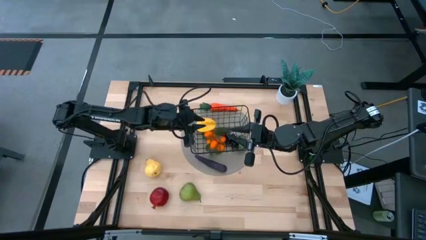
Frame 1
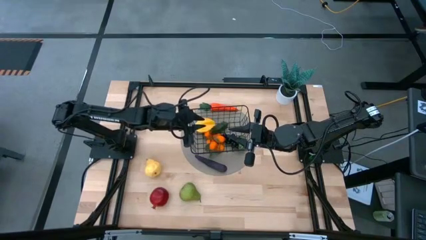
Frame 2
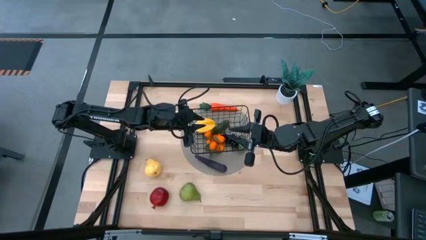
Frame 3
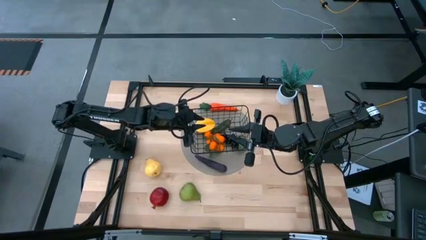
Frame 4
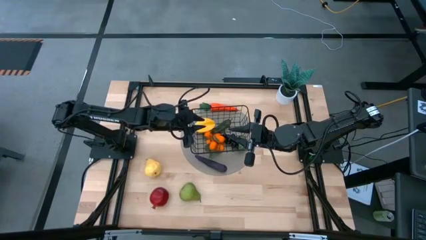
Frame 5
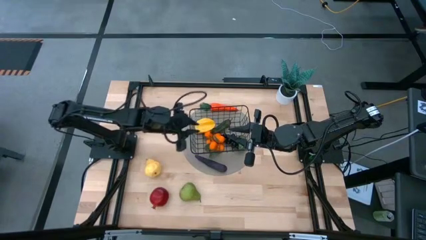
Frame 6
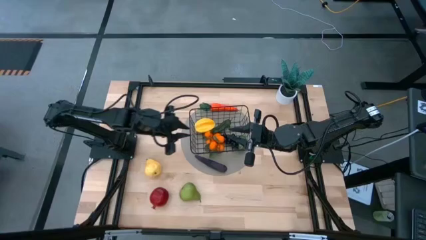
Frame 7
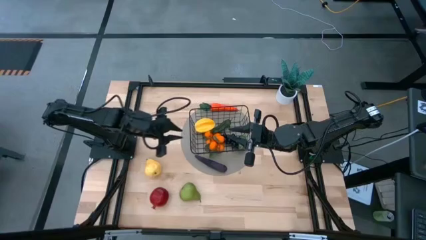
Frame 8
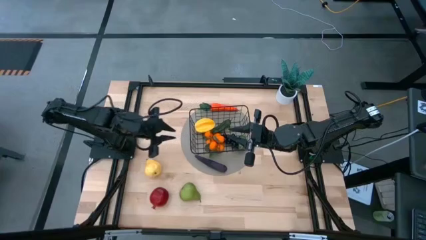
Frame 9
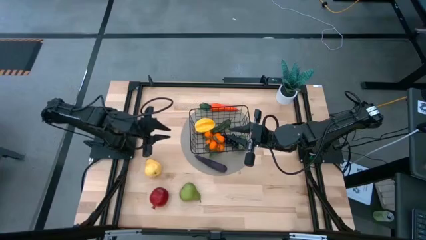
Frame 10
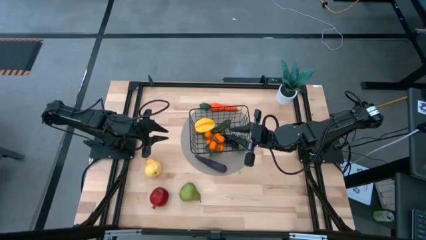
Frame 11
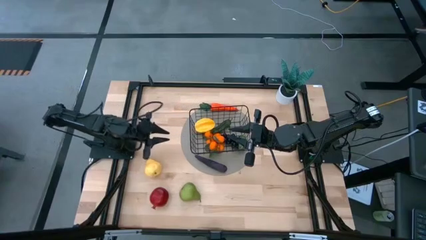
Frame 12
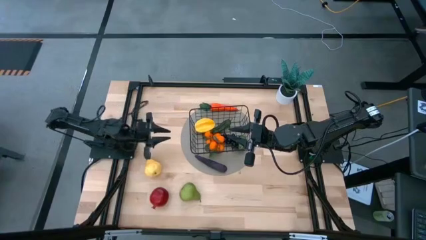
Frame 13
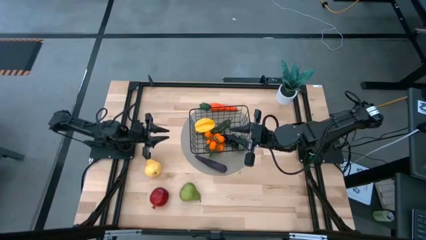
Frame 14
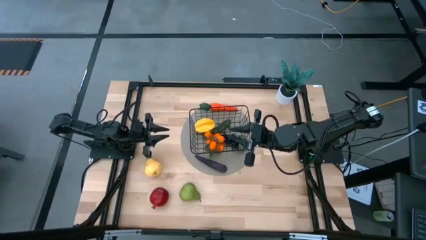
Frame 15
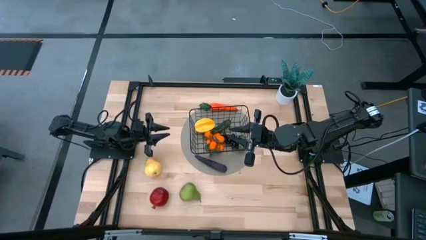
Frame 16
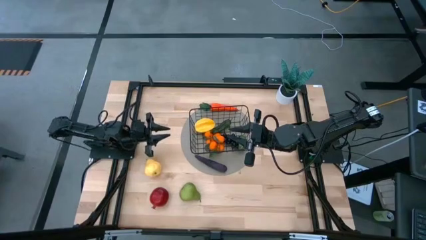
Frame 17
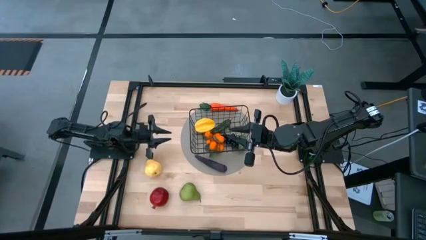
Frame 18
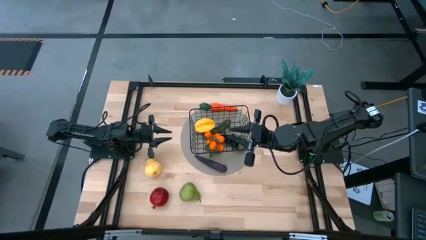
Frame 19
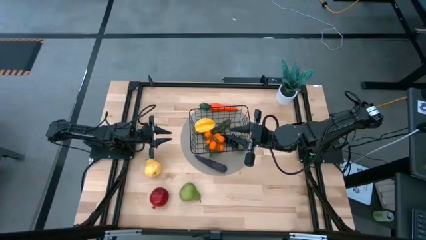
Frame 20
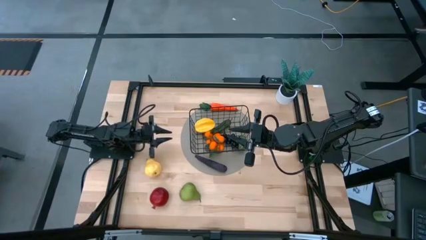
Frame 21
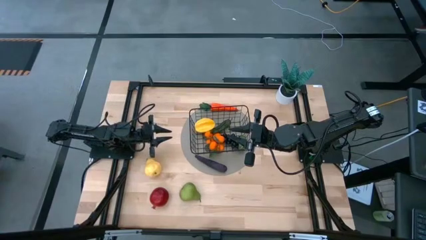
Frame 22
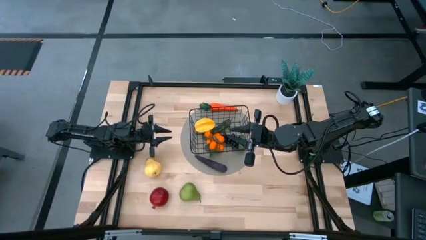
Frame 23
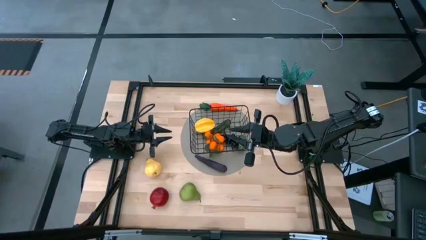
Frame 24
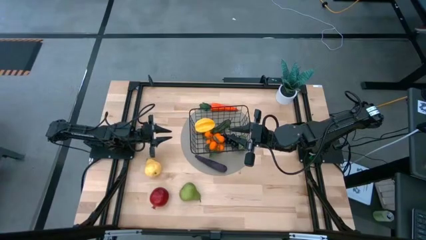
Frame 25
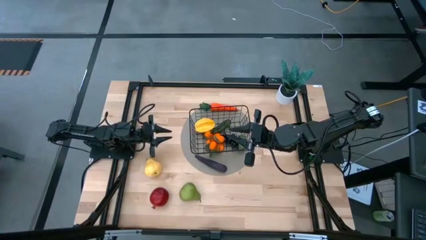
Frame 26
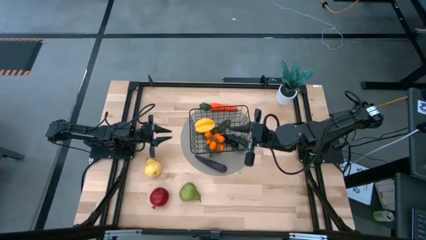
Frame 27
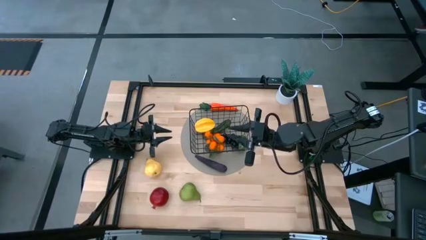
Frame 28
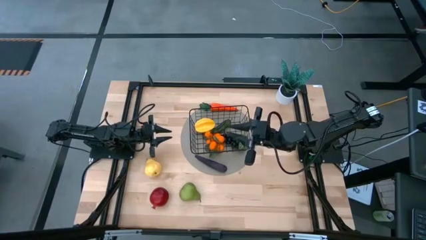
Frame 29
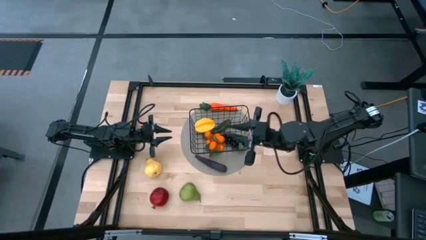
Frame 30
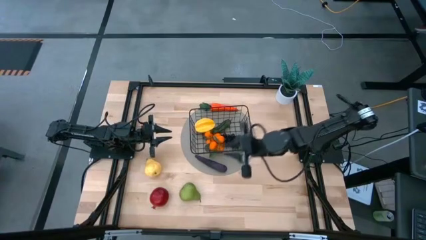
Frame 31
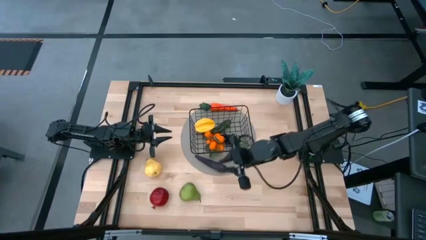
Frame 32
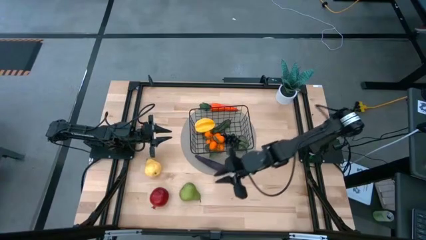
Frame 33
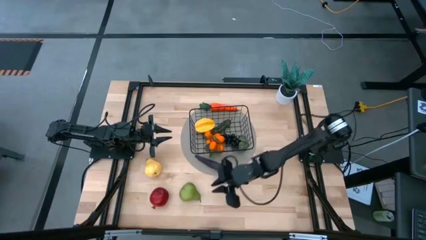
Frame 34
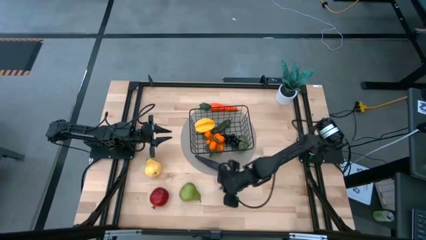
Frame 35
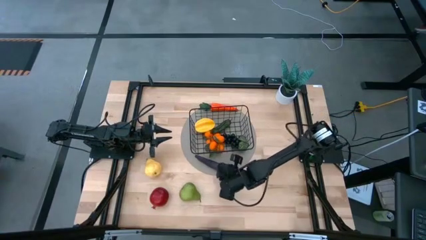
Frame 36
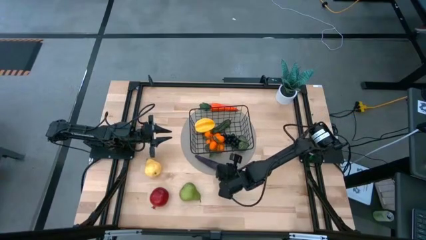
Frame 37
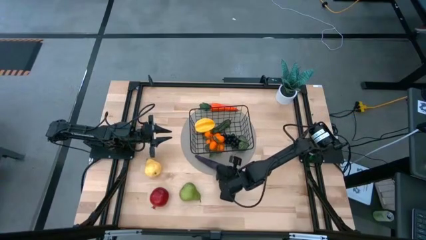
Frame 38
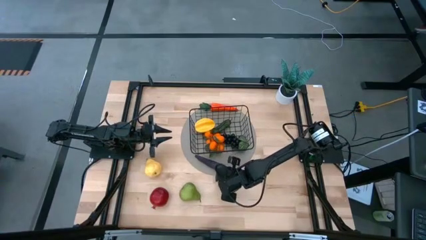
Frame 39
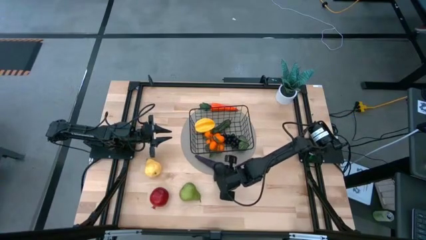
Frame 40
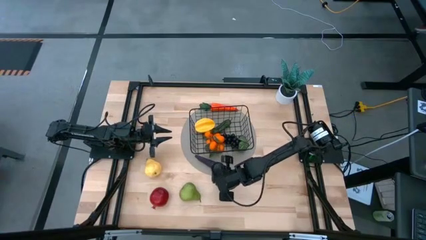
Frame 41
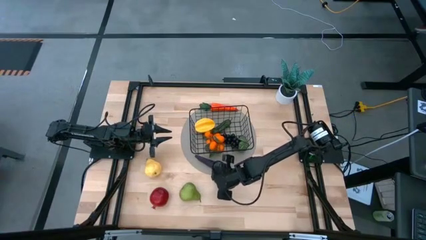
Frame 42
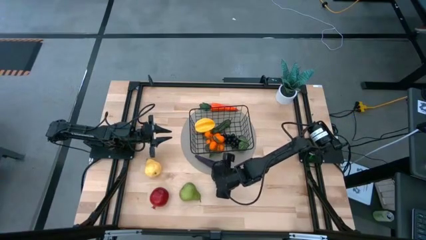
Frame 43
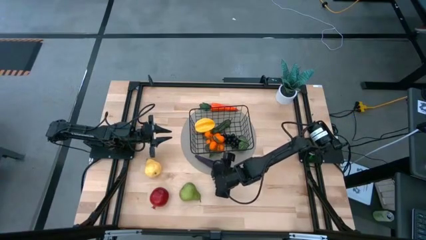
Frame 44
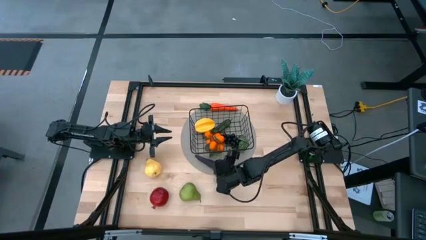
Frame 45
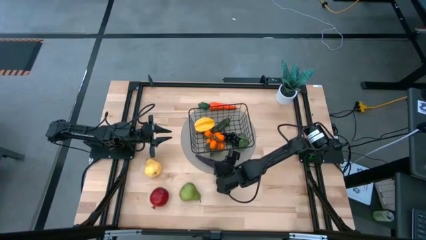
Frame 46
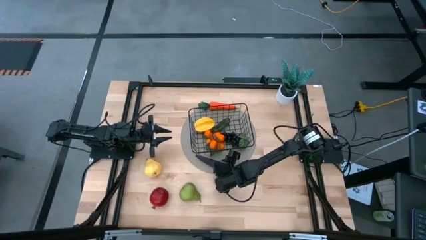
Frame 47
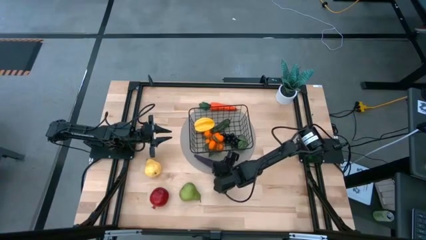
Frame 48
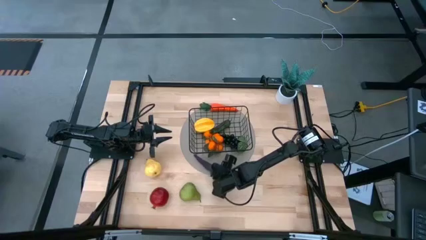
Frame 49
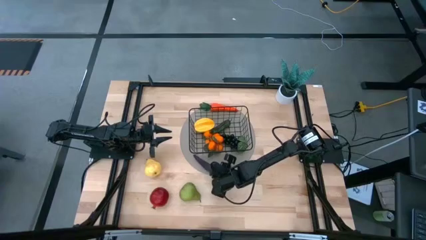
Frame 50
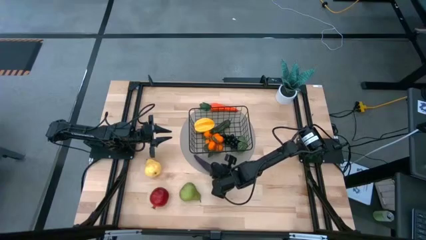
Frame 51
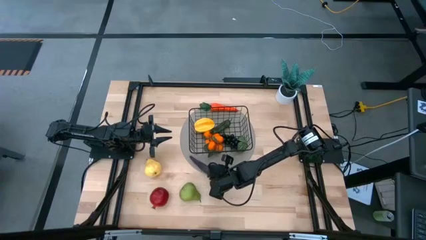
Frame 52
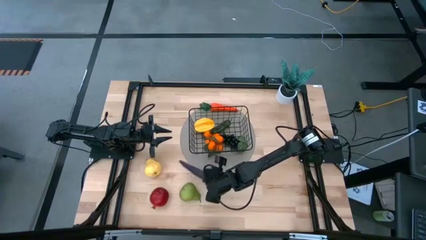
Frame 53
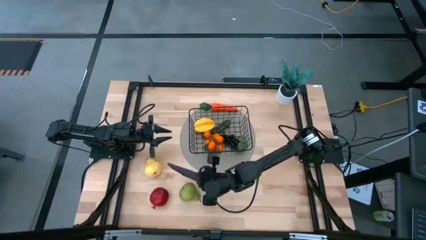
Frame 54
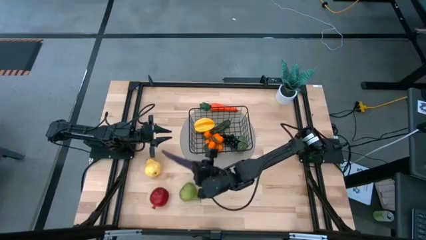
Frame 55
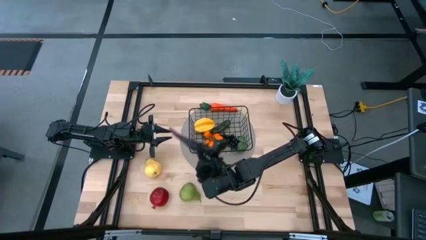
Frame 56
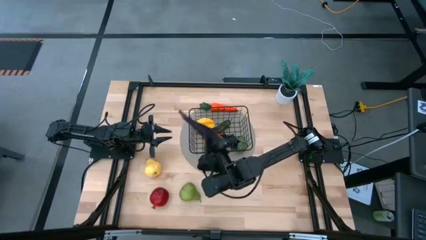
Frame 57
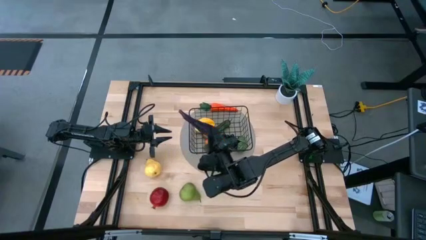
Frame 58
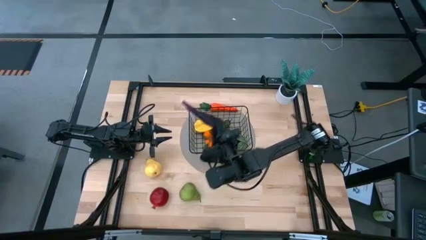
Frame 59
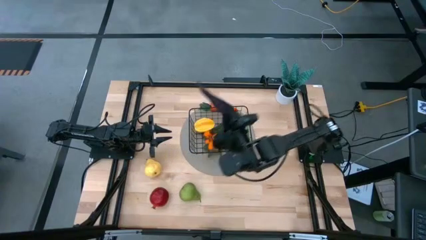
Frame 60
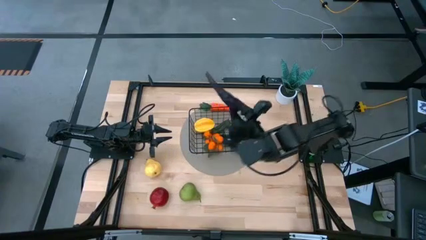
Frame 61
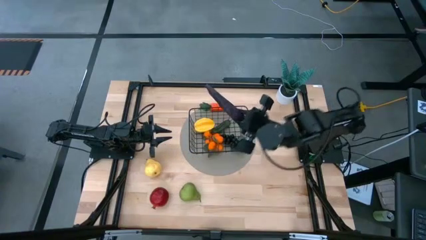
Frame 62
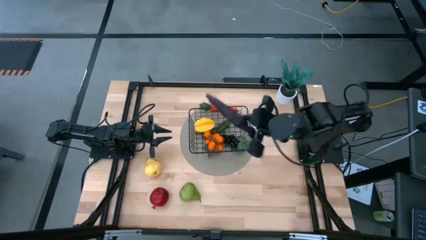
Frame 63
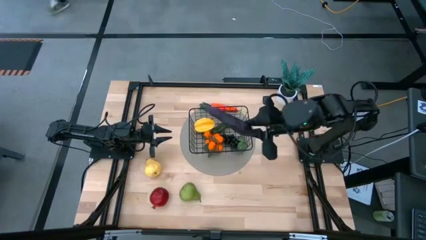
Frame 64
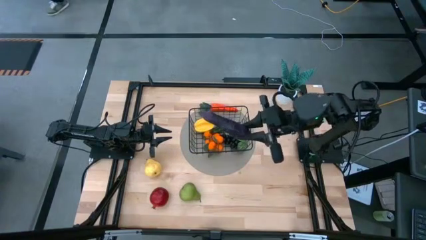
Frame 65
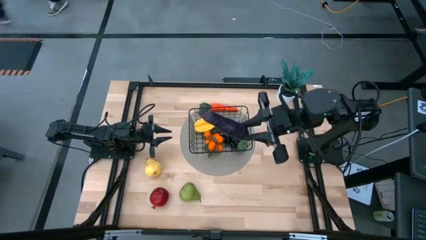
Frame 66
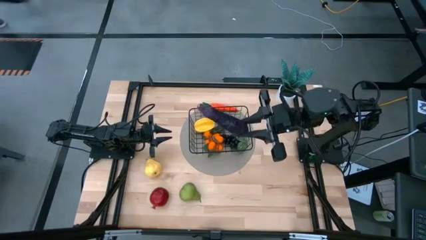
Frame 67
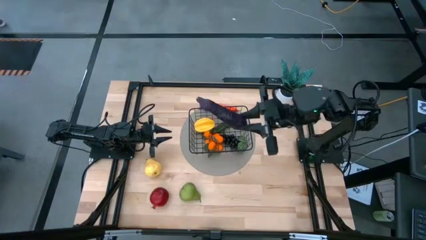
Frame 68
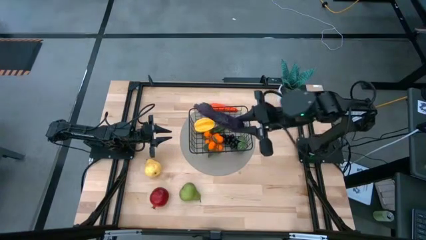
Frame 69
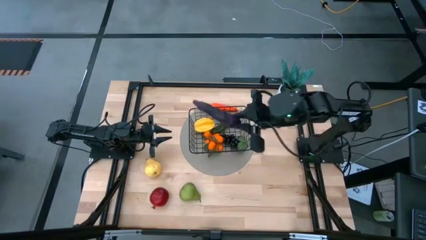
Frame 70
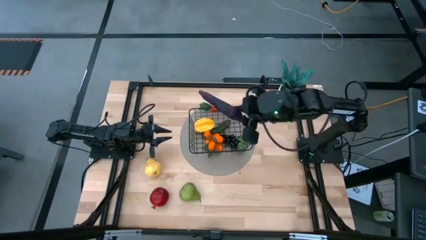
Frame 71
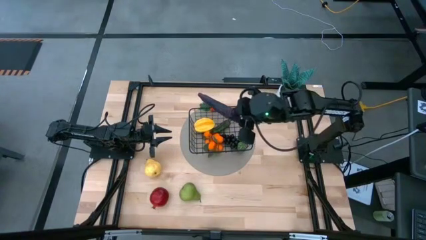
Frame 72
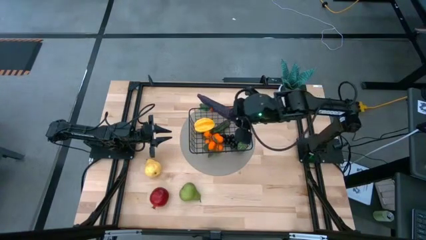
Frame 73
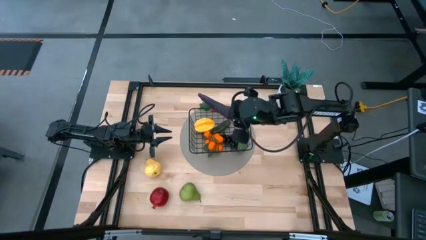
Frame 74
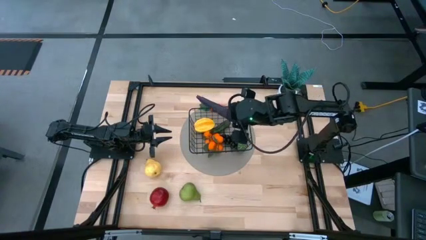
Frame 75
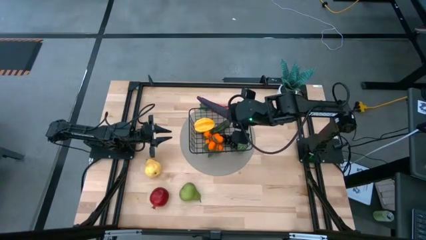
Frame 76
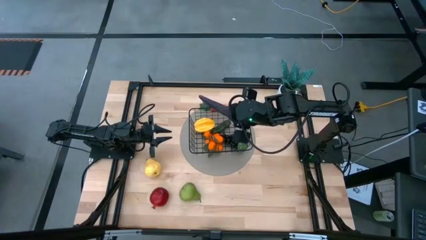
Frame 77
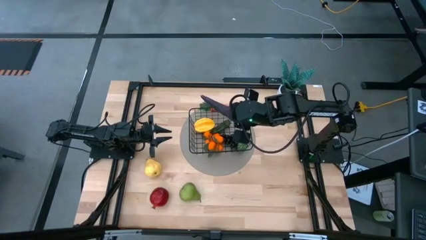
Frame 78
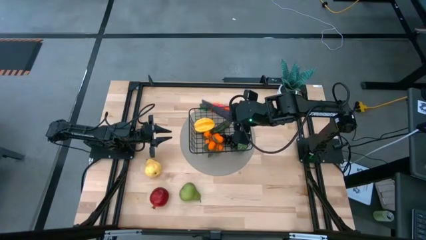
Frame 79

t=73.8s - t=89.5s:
Task: Build produce basket
Put the eggplant in the mesh basket

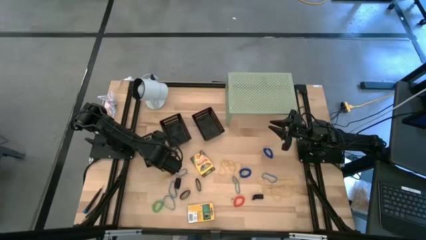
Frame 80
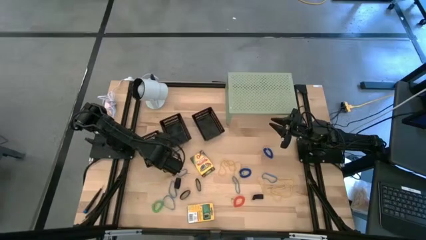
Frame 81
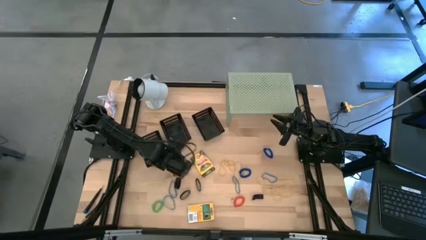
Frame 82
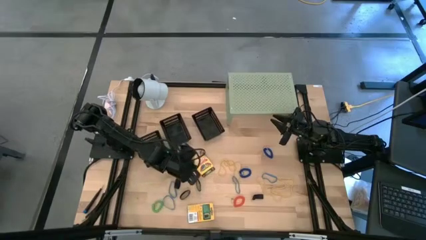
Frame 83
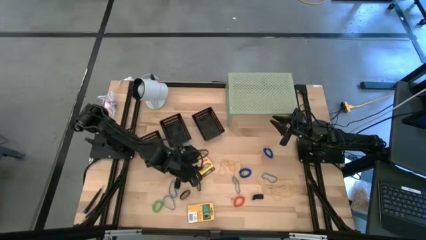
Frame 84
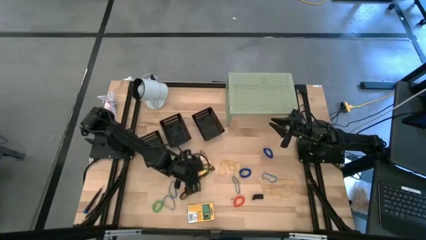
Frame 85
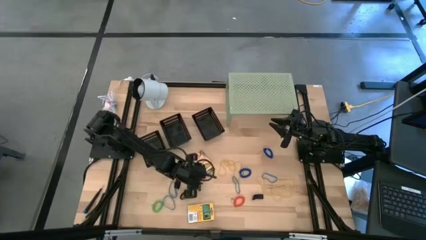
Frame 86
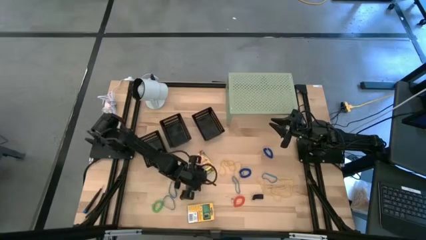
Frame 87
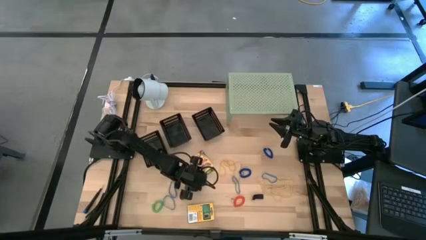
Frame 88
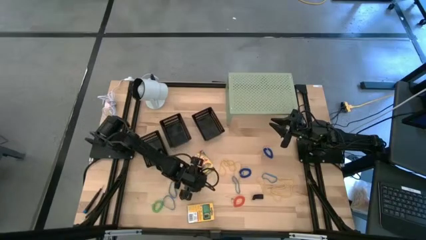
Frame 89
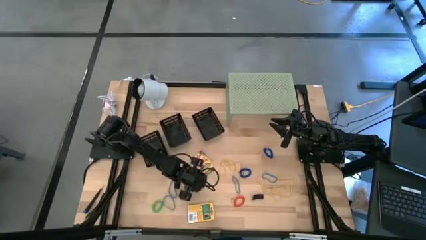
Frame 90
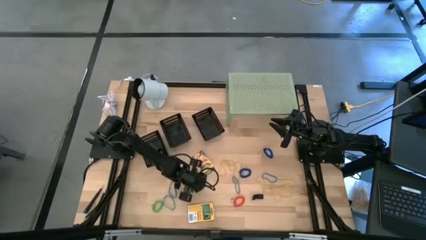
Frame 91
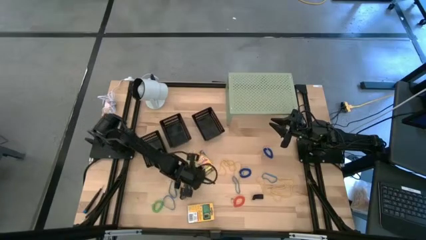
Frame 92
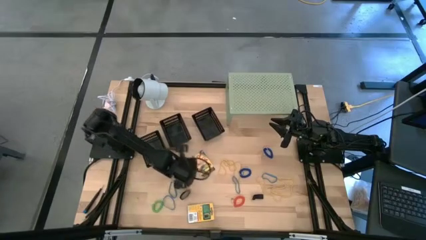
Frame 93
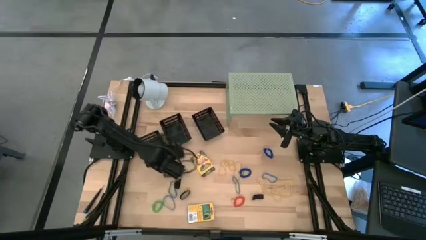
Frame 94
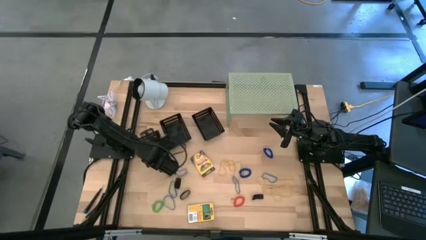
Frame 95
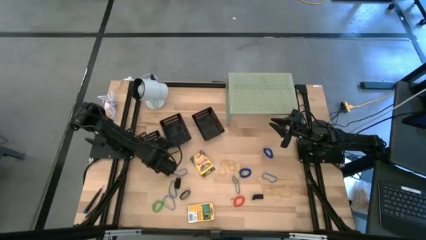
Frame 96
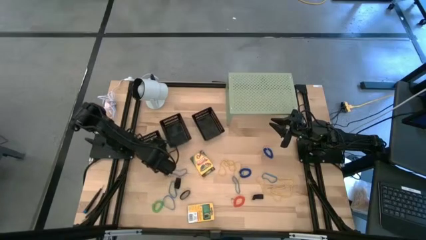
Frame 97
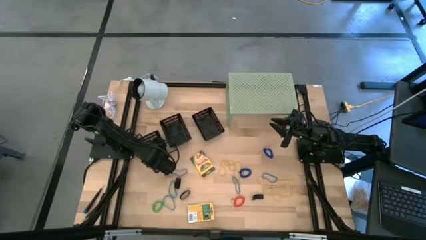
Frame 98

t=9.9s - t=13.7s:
Task: Pick & Place Office Desk Supplies
Put the black rubber band into the left black basket
